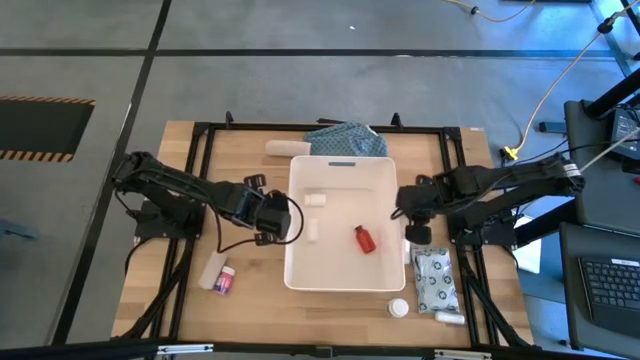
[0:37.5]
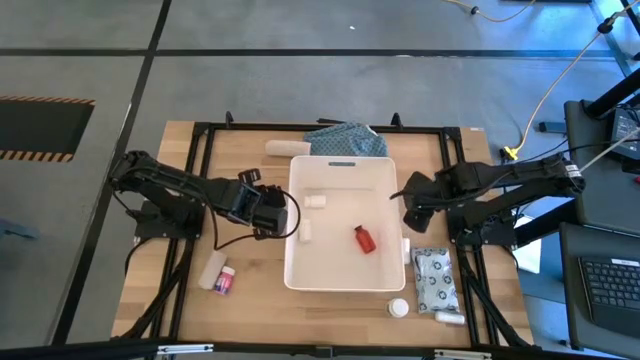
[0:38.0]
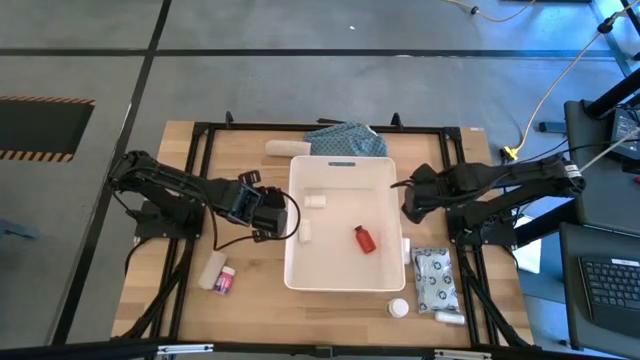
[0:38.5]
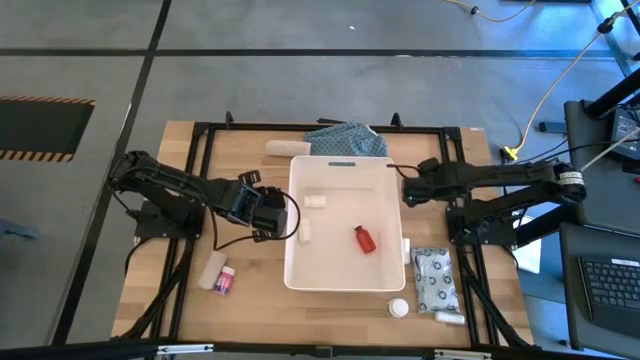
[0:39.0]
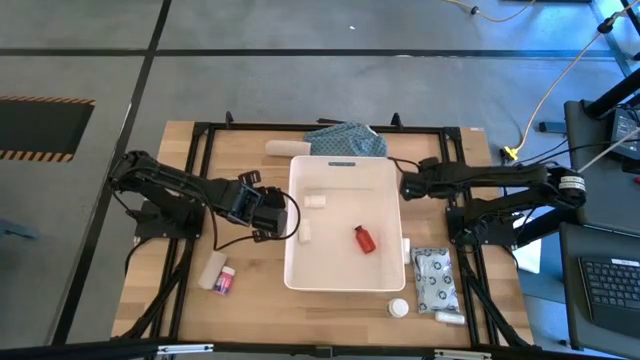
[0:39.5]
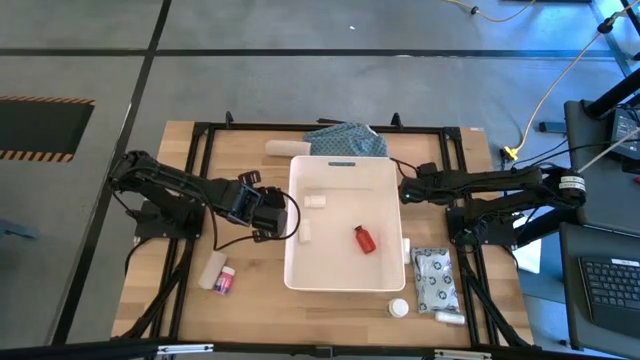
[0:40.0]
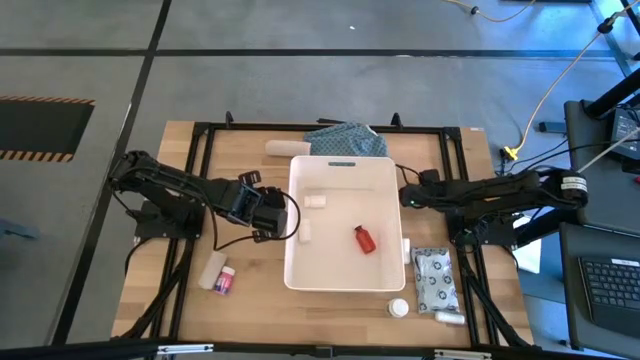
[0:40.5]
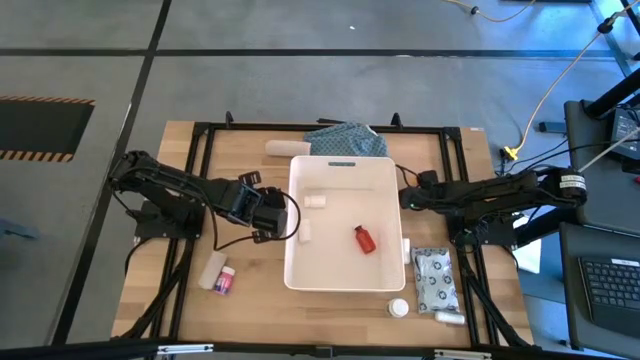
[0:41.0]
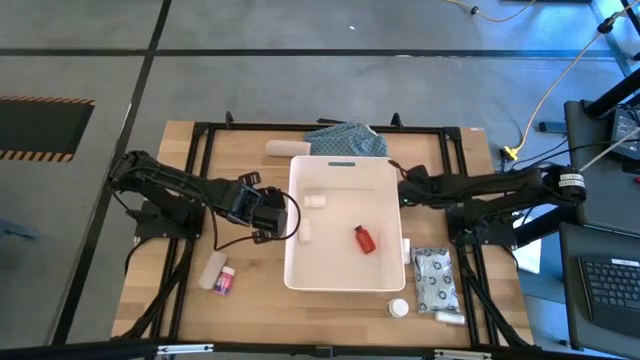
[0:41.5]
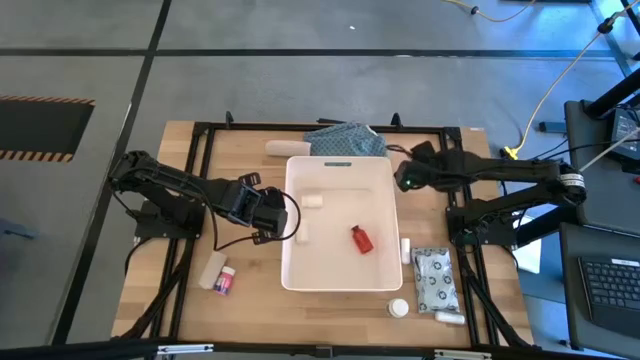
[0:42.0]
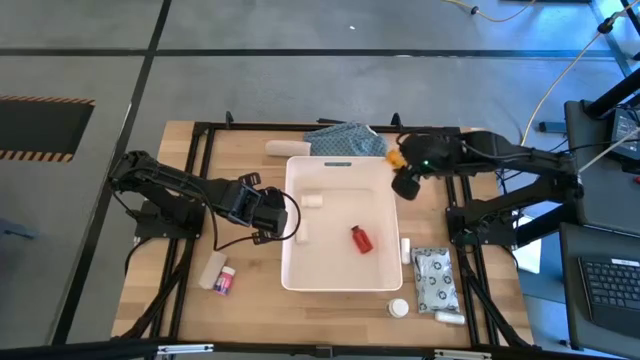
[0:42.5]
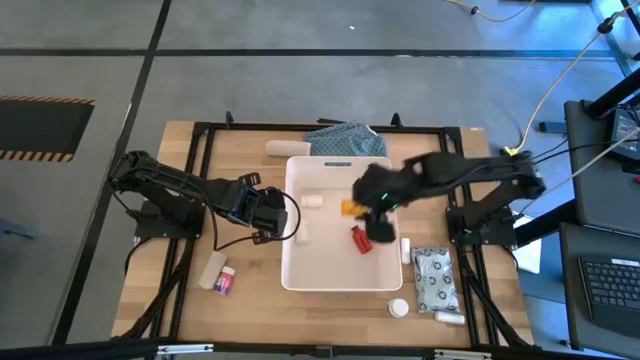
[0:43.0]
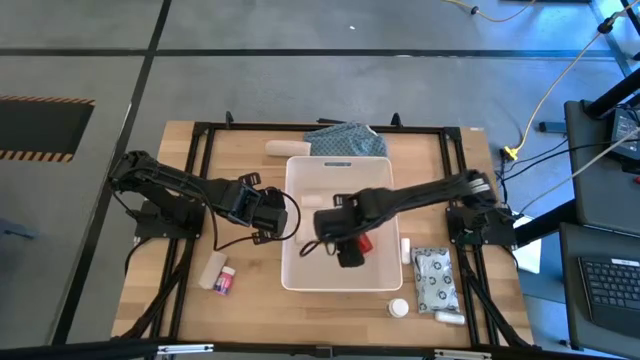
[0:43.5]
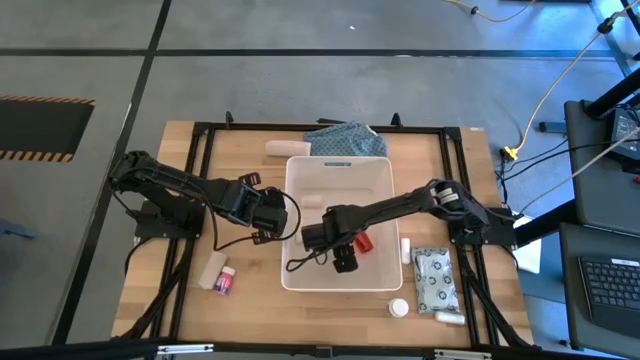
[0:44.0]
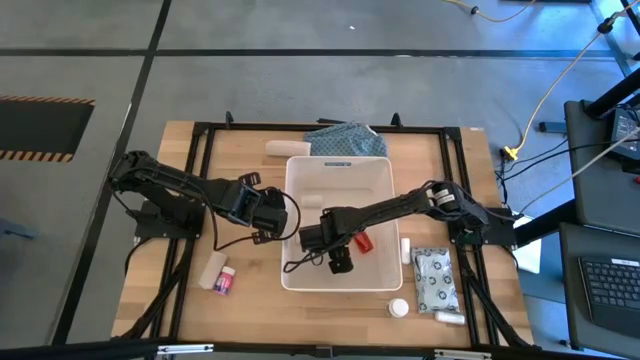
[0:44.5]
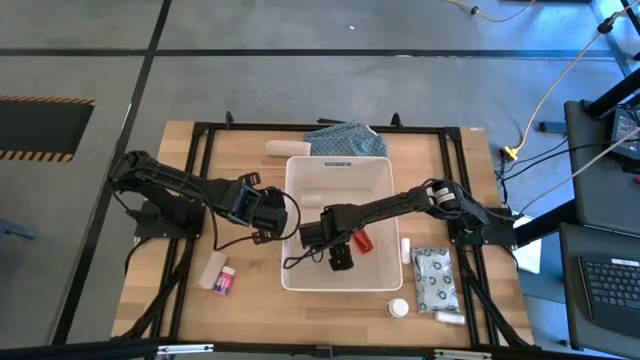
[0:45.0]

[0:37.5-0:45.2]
Task: Pick & place medical supplies in basket/bin
Put the orange pill bottle into the white bin

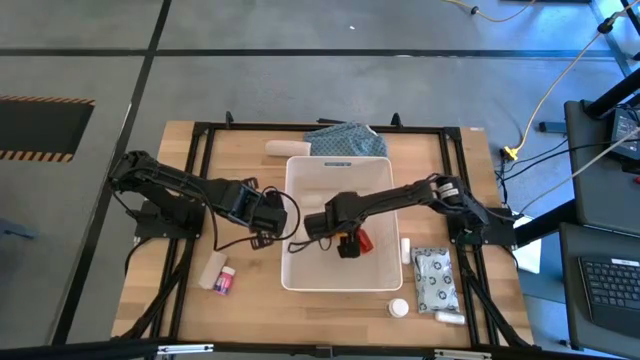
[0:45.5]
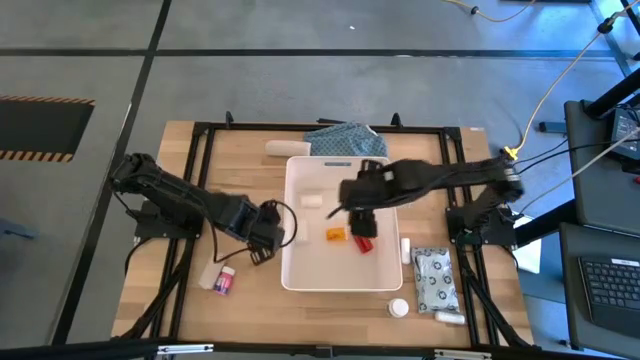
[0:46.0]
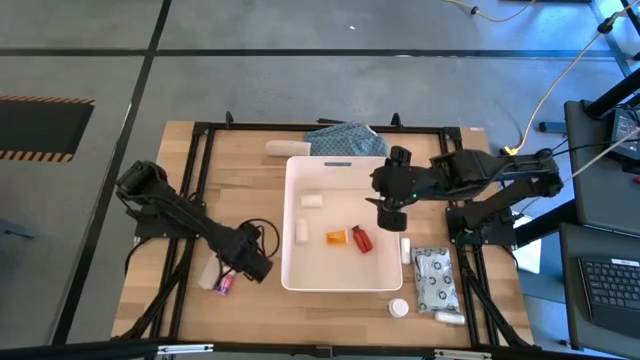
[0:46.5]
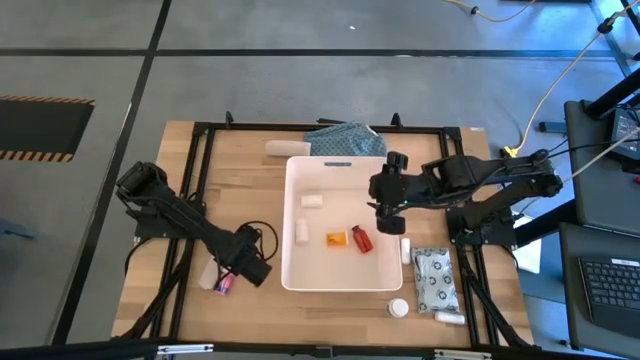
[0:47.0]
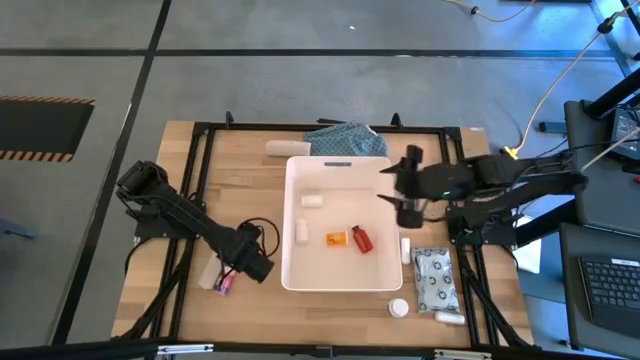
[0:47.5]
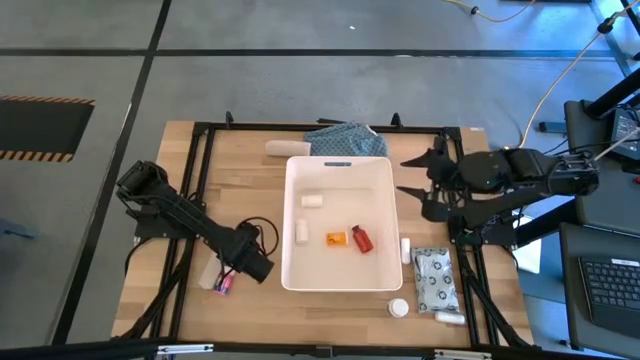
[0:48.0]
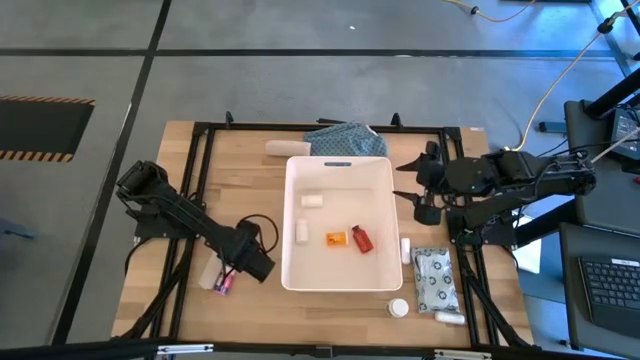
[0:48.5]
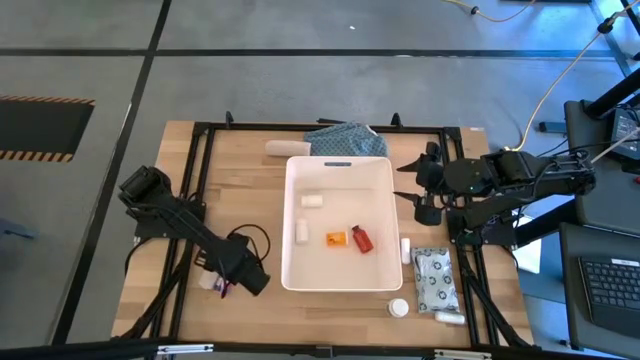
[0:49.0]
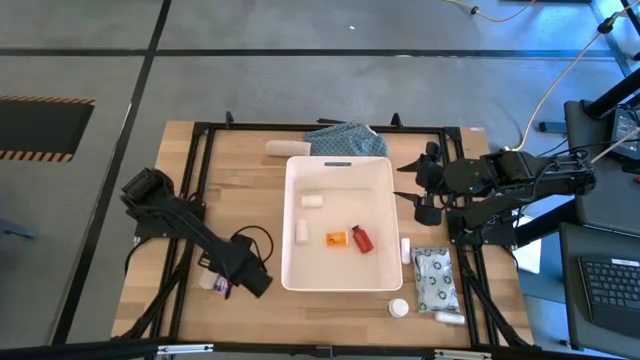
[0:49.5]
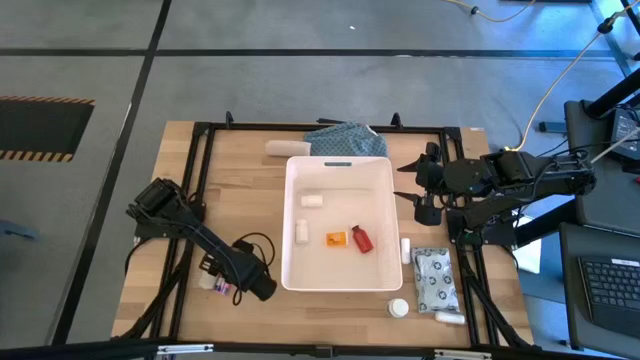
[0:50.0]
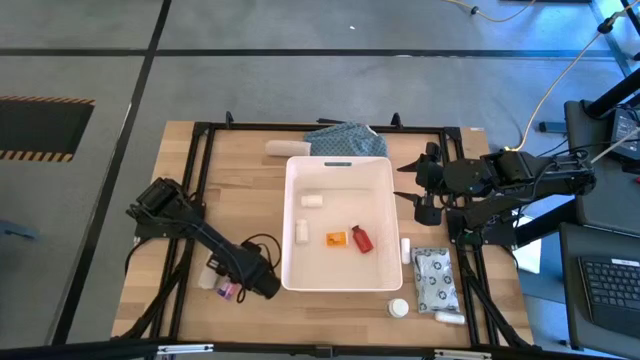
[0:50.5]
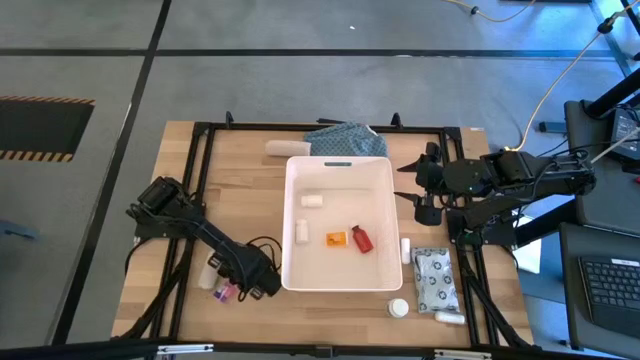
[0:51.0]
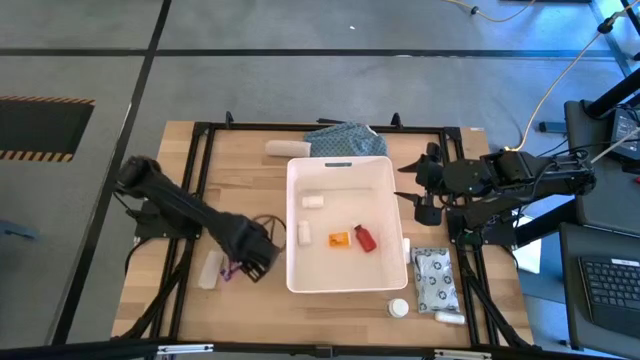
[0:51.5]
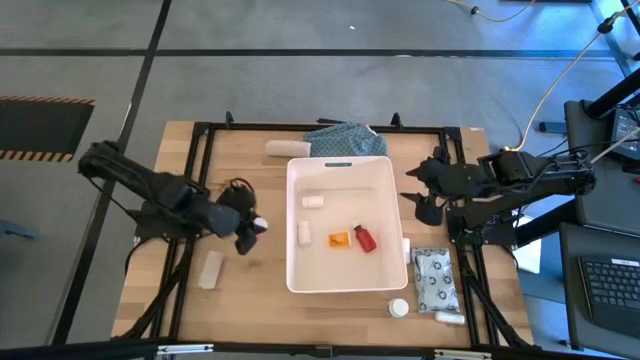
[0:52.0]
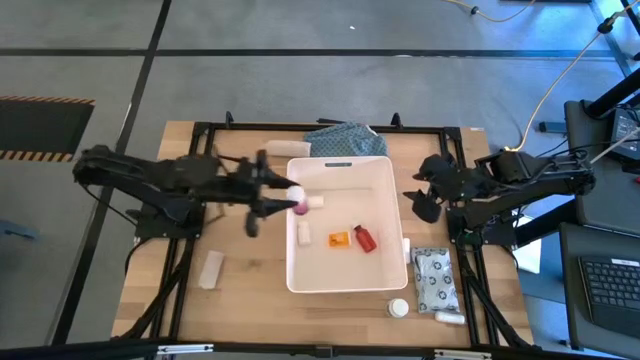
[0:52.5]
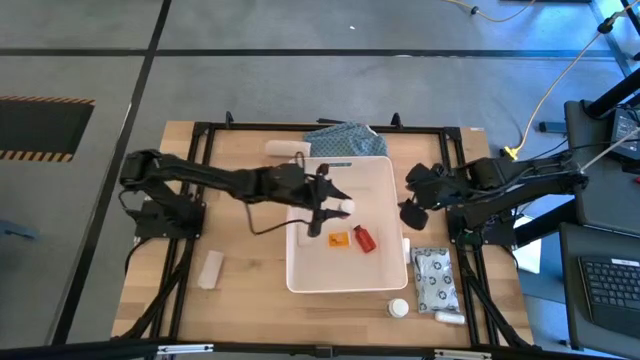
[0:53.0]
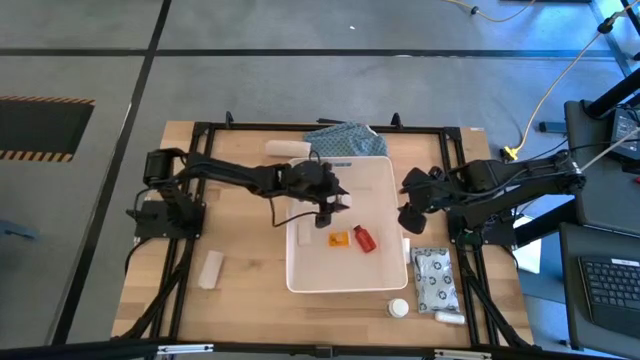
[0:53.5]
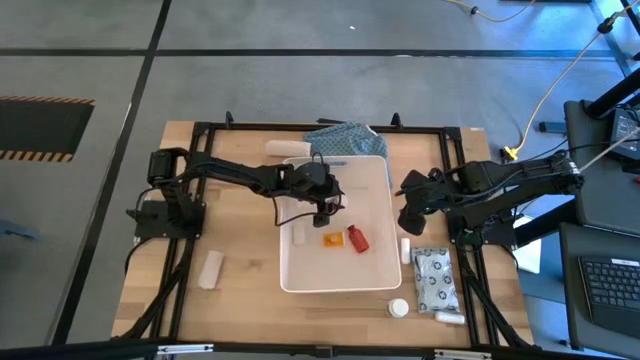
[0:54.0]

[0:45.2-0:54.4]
Put the pink pill bottle into the white bin

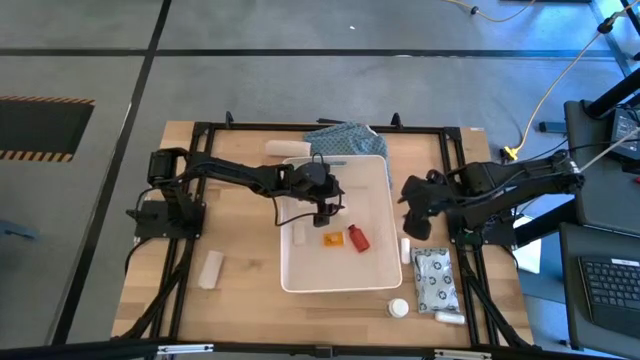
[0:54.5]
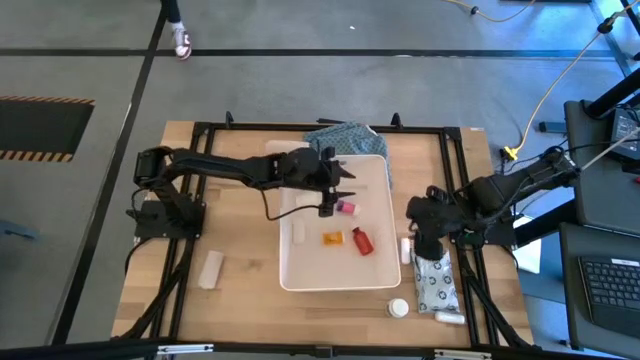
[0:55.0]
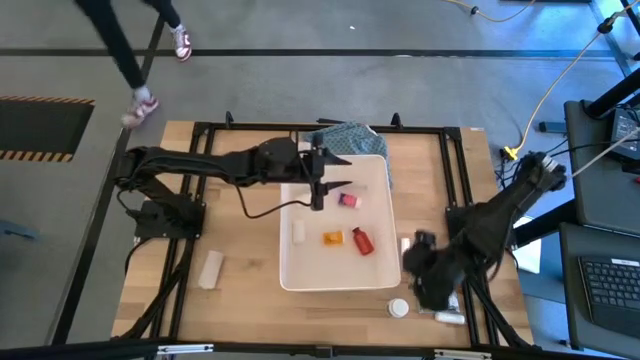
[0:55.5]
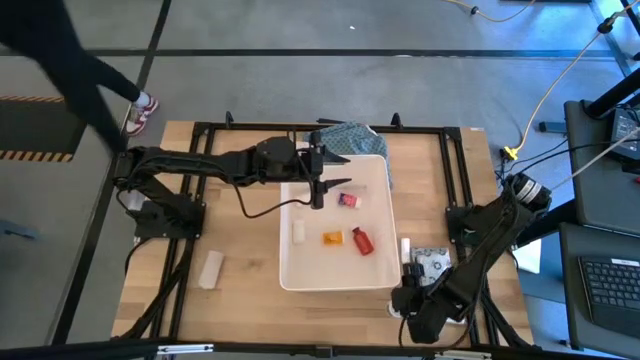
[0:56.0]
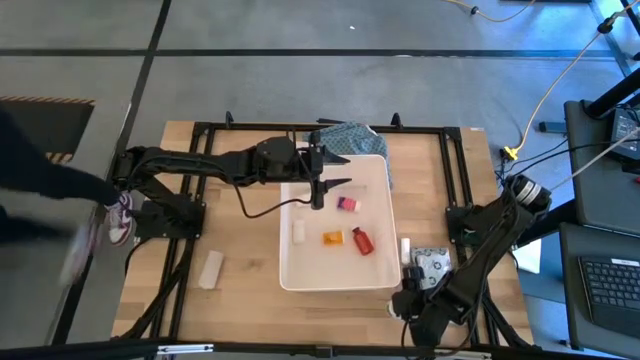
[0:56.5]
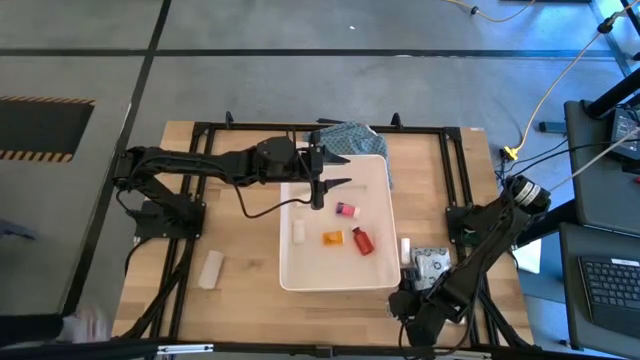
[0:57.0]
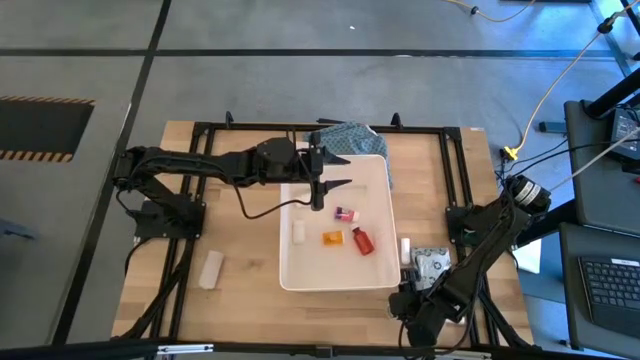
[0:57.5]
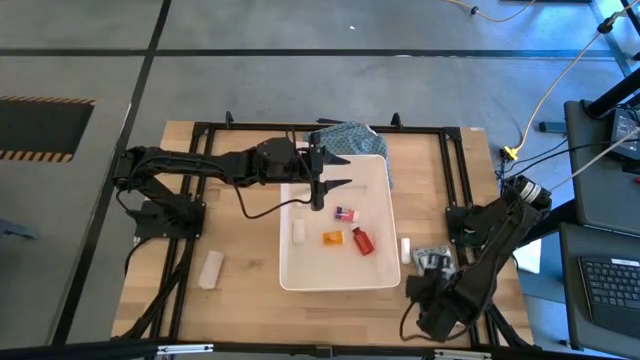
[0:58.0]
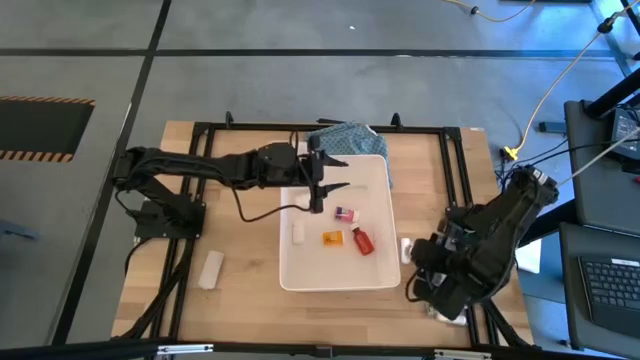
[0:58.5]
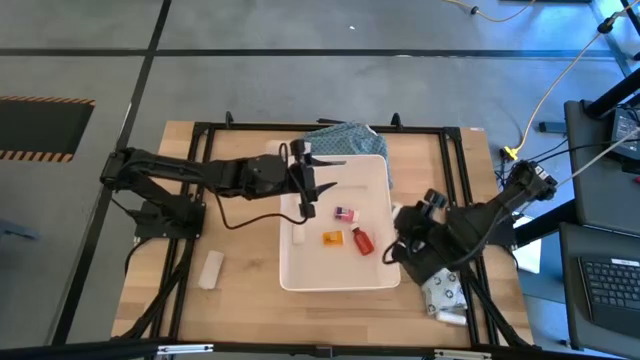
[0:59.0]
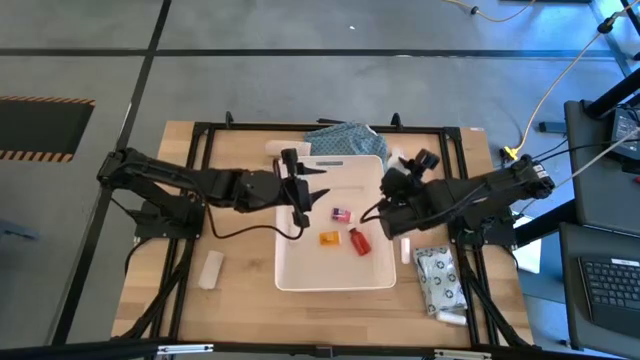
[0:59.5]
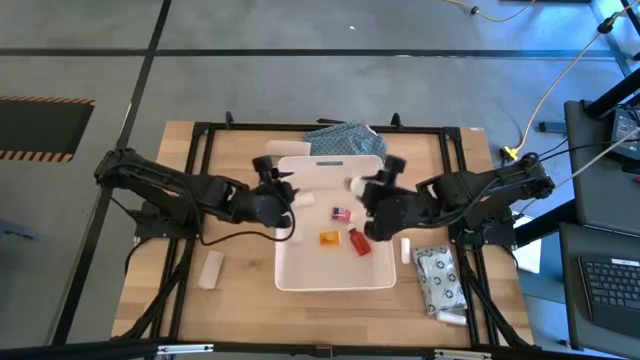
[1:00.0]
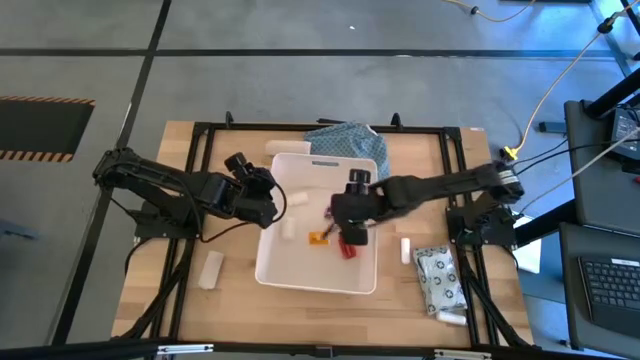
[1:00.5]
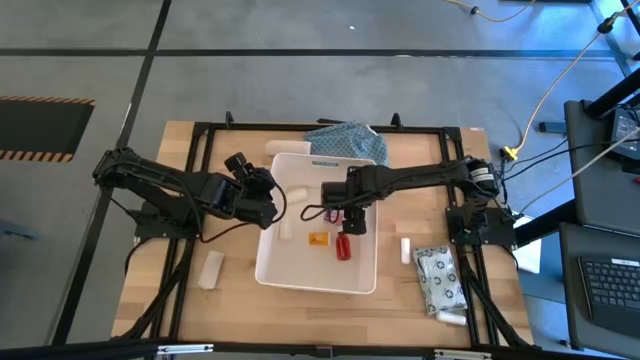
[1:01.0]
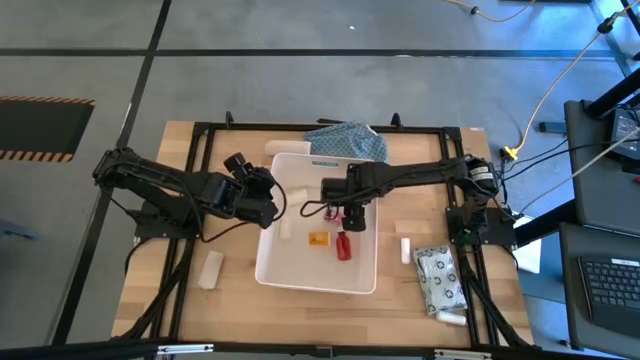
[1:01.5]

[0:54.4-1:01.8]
Put the white pill bottle into the white bin
